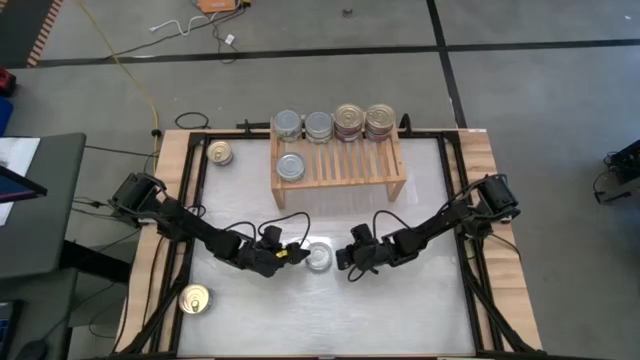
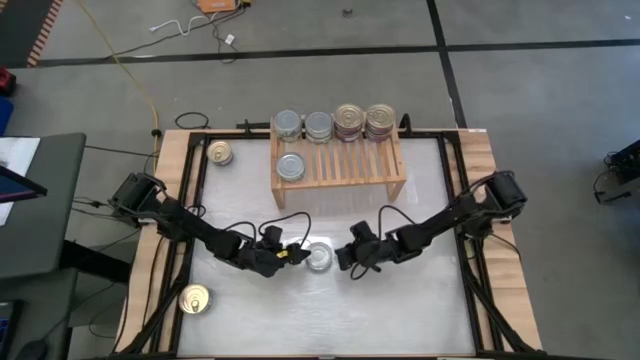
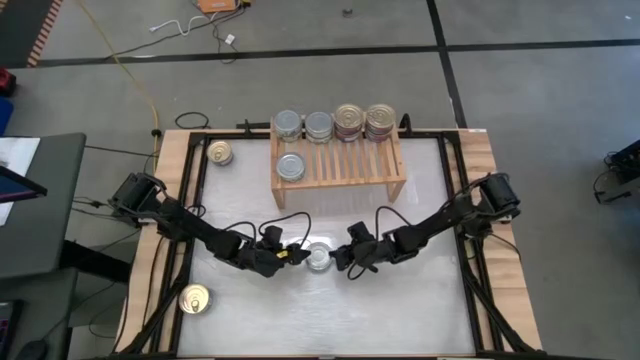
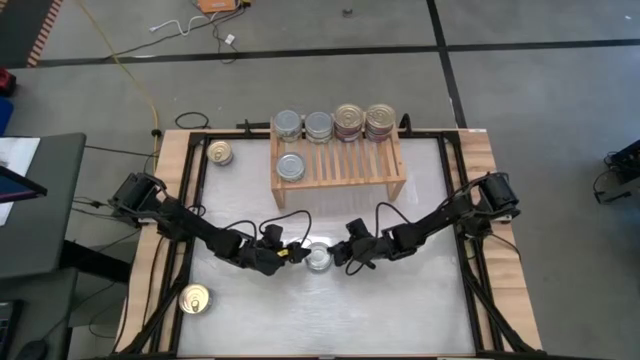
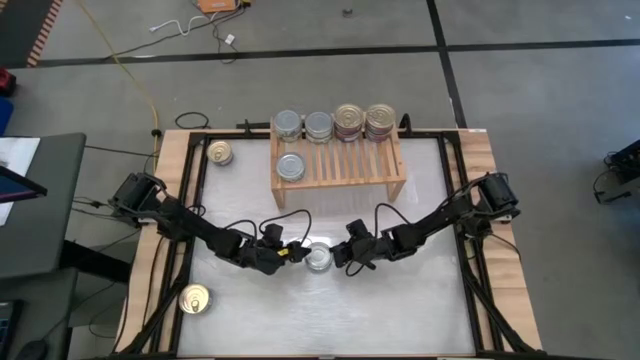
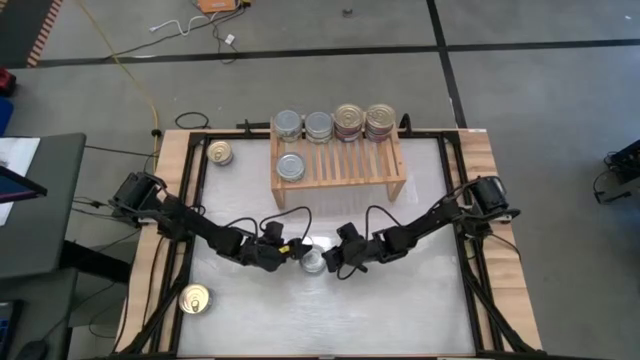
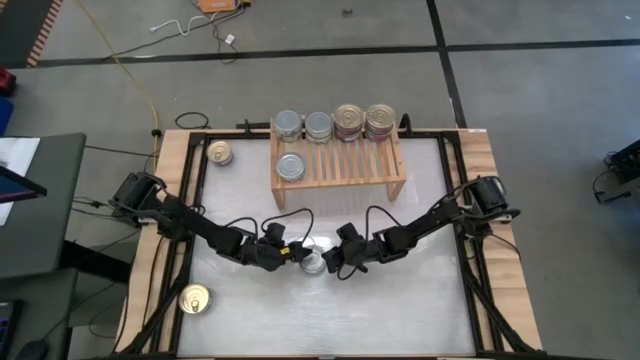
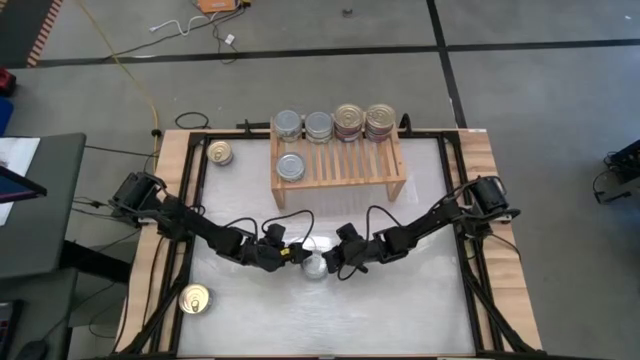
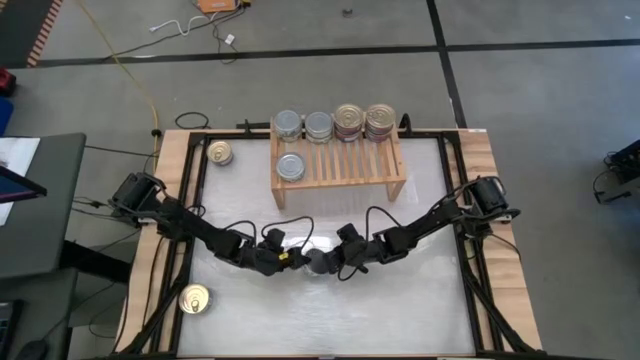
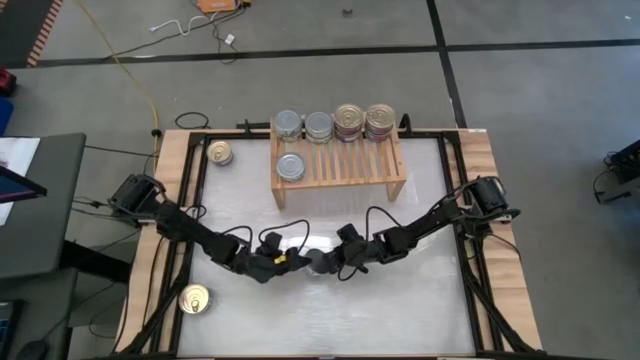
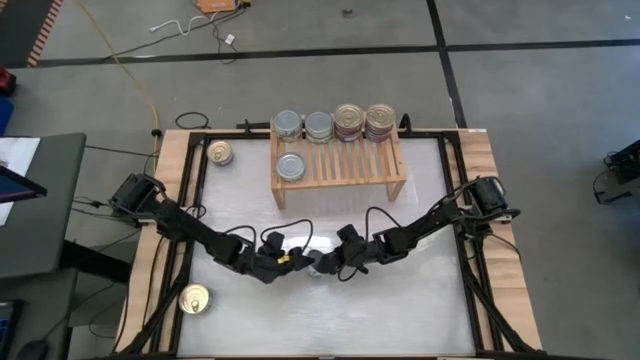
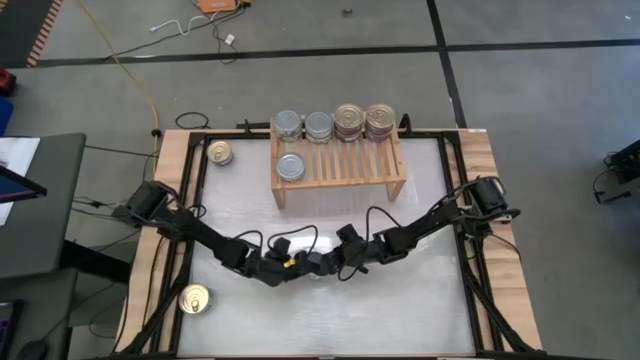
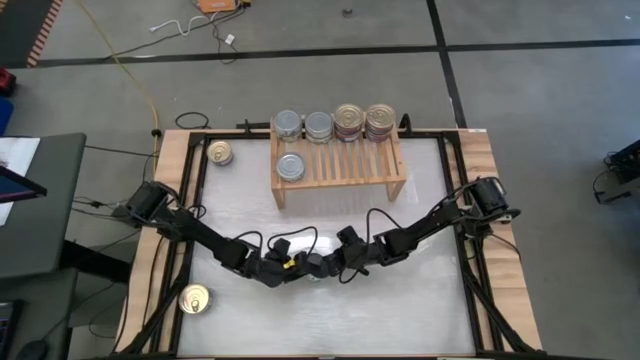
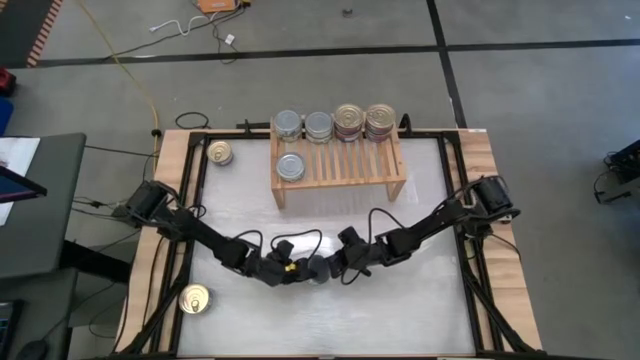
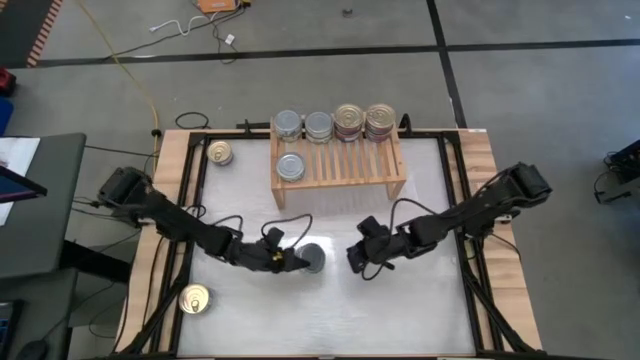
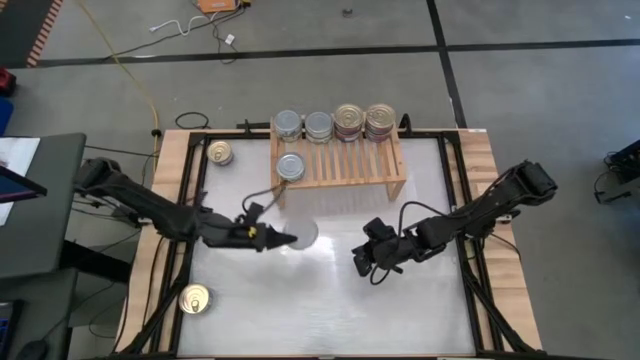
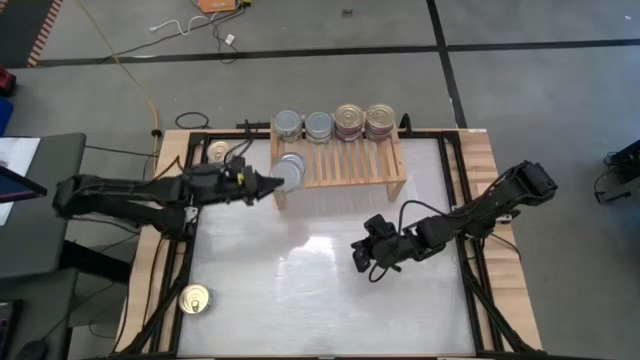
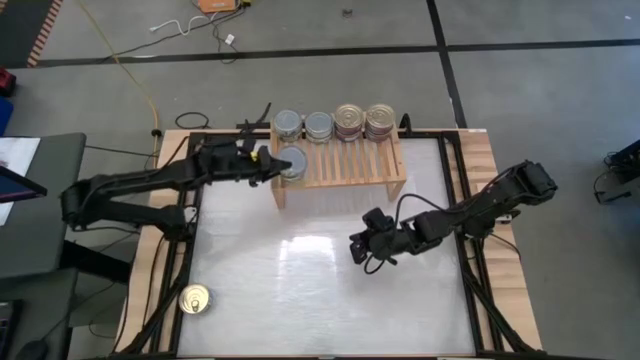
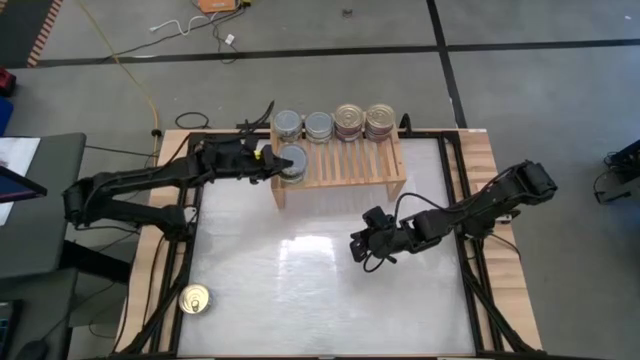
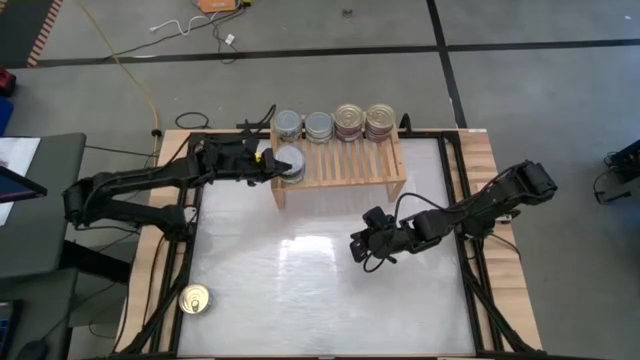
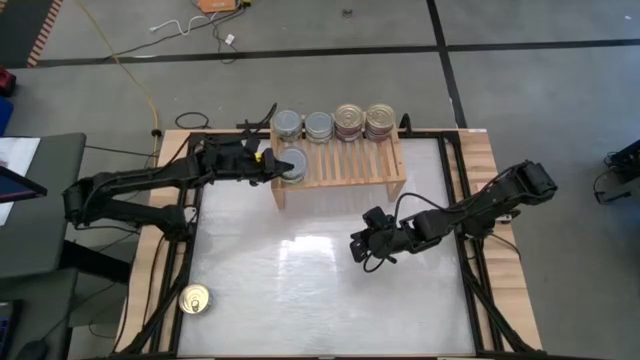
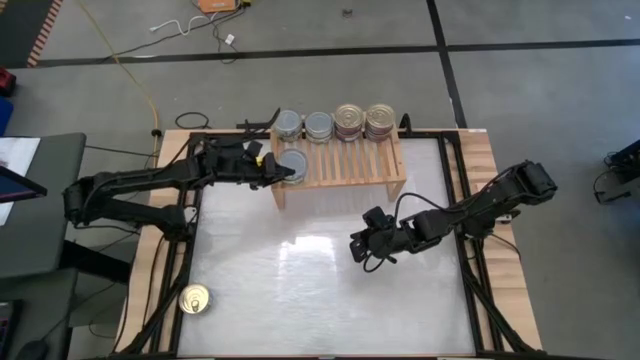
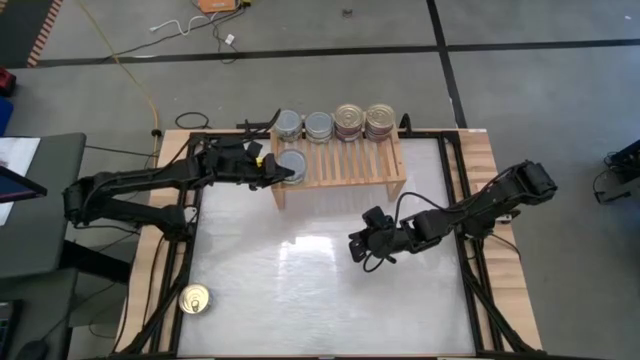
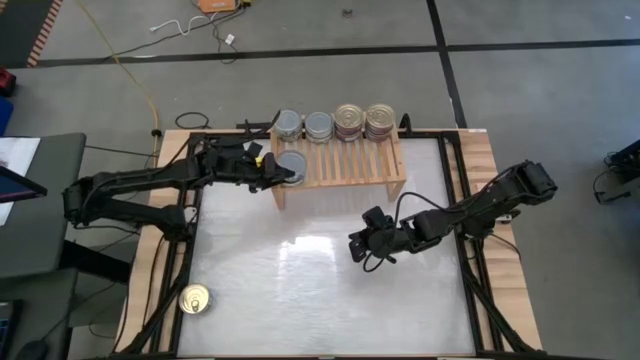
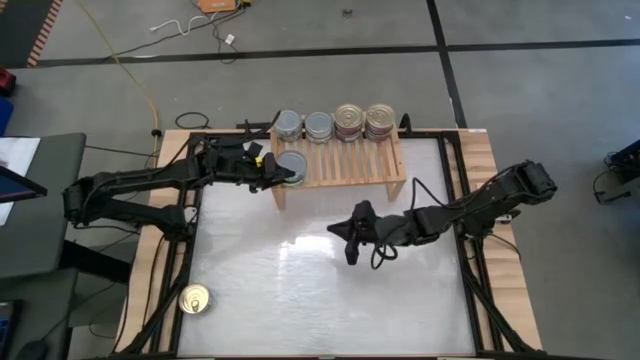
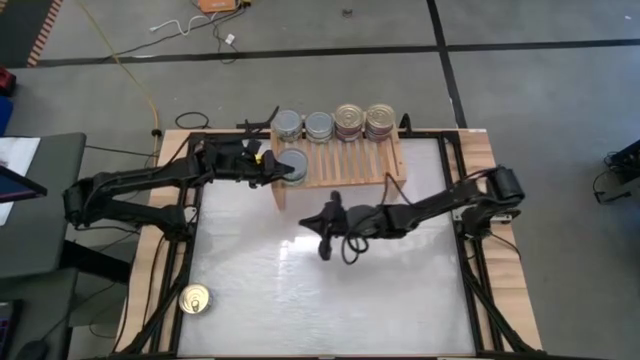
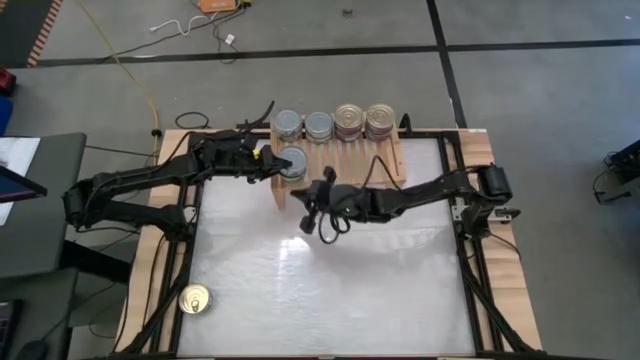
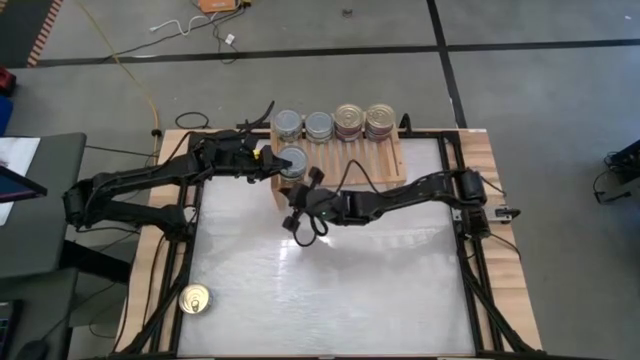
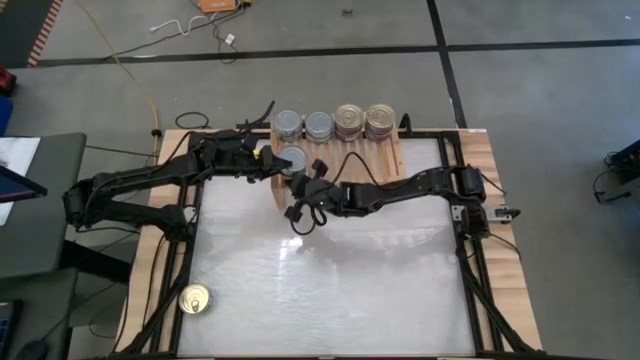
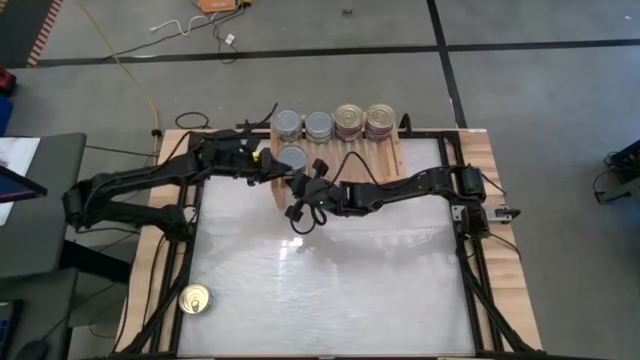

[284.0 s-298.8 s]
Task: Stack canned seafood by type on shelf
Stack the green tuna can on top of the green tuna can on the shelf

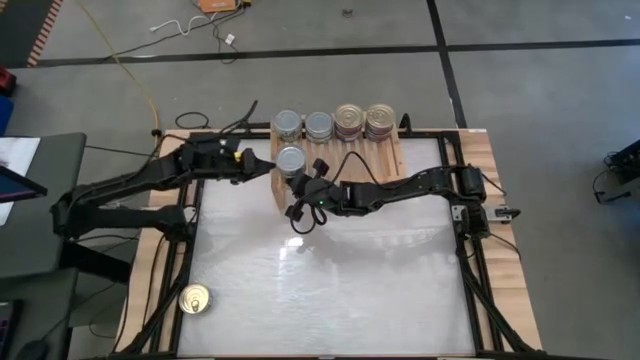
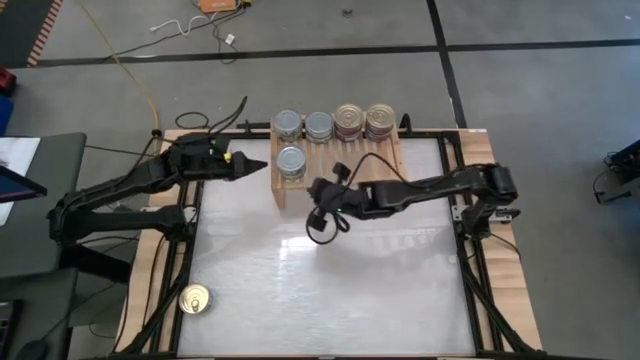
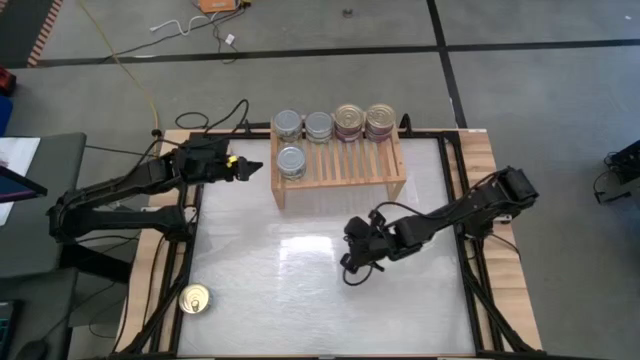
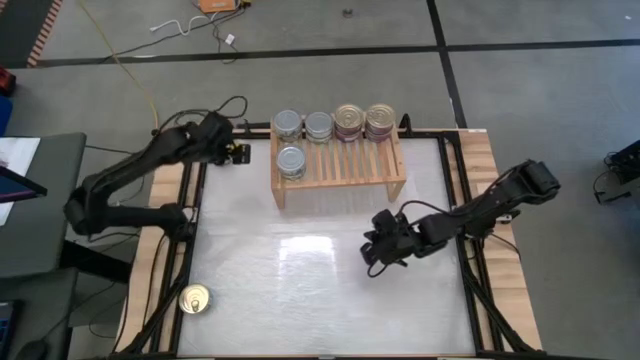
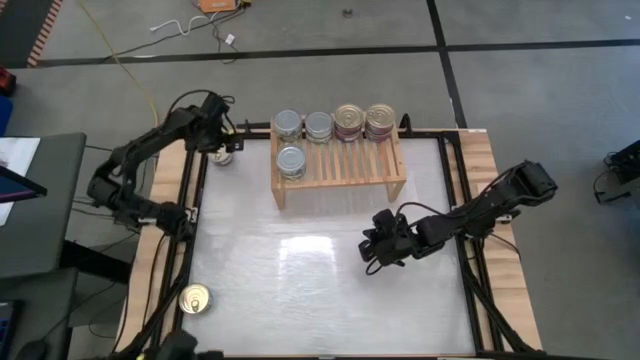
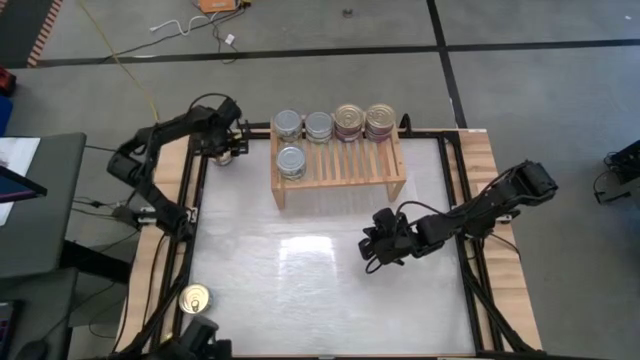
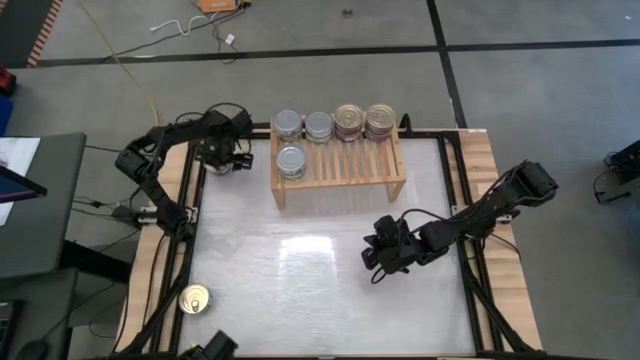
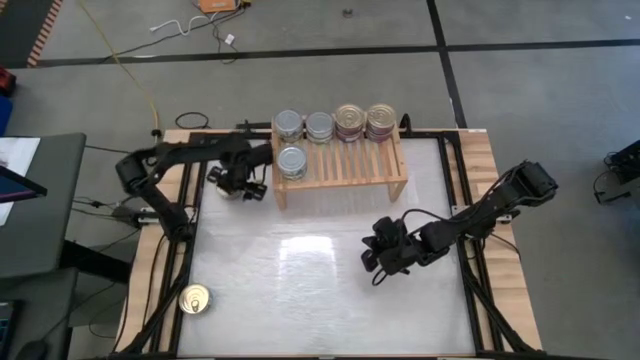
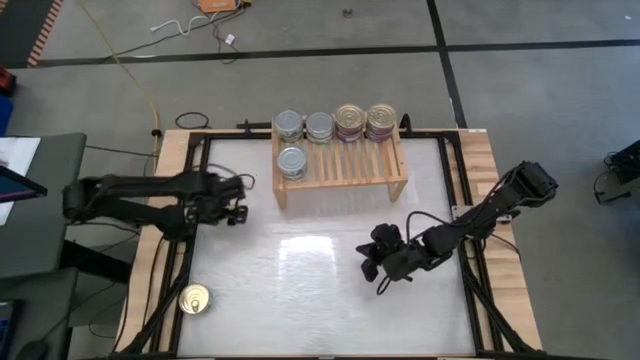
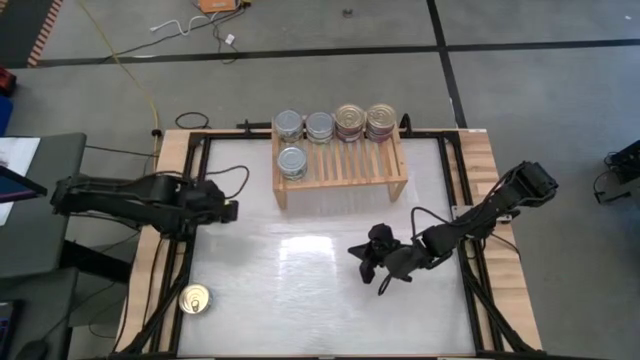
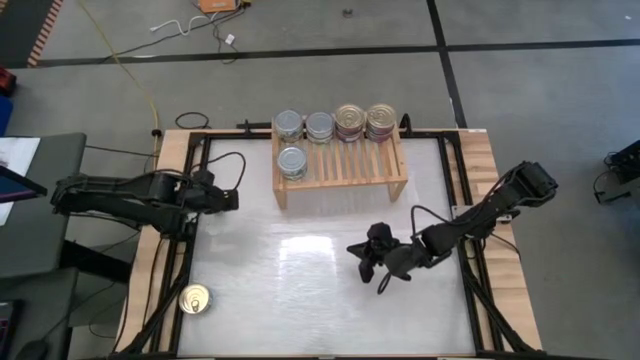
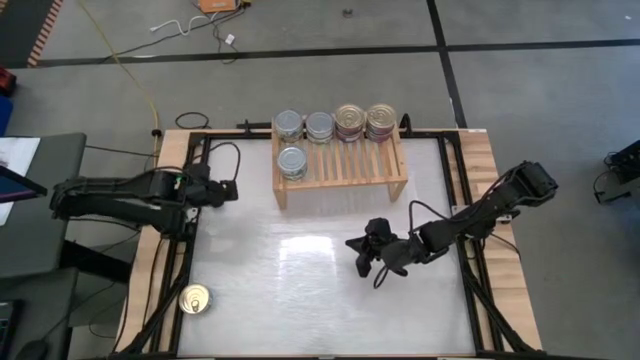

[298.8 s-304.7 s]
Put the blue tuna can on the shelf

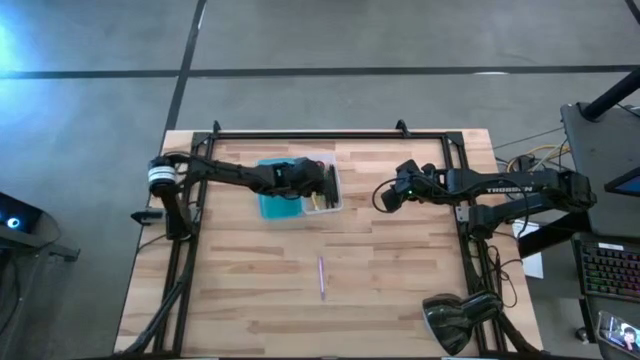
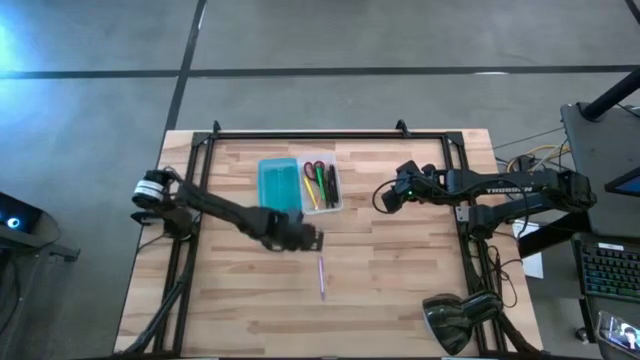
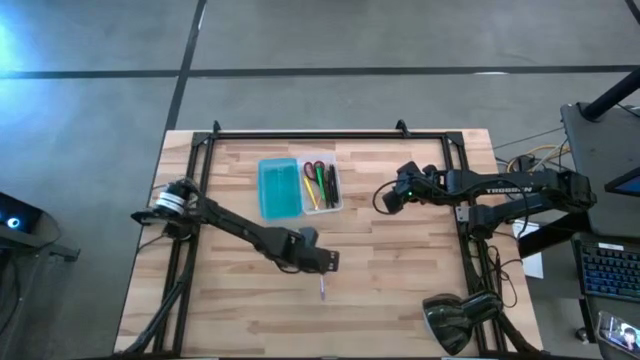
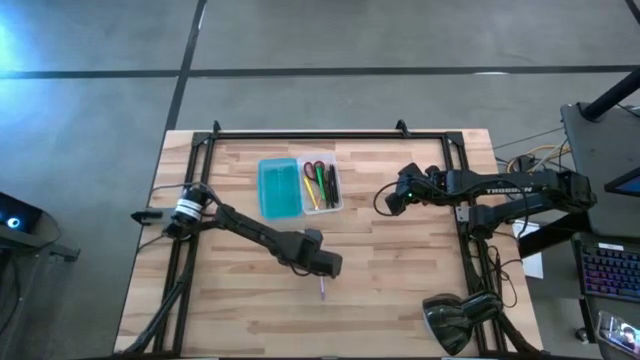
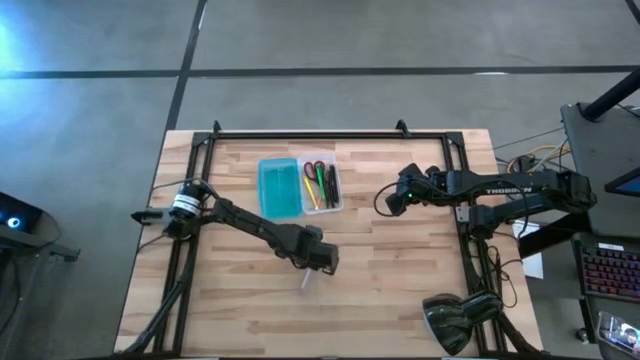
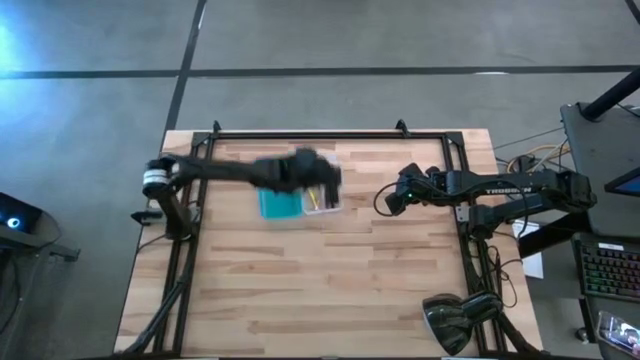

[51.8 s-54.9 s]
Task: Pick & place school supplies into a supply box
Put the purple pen into the pencil box
